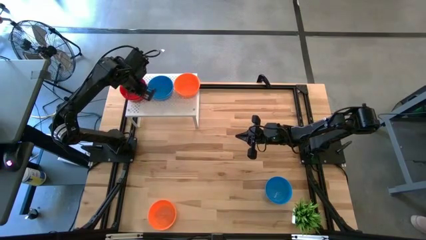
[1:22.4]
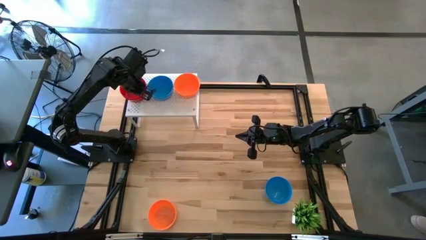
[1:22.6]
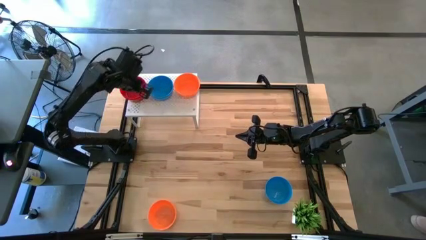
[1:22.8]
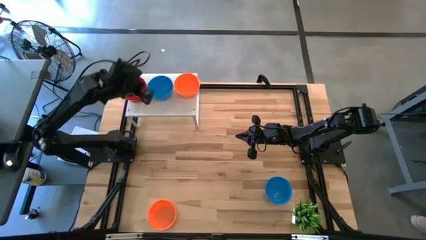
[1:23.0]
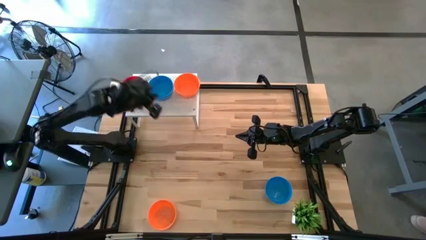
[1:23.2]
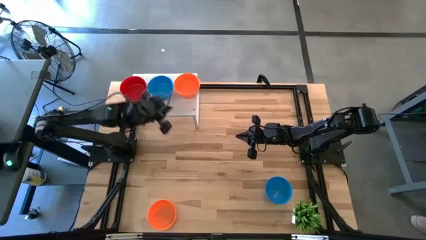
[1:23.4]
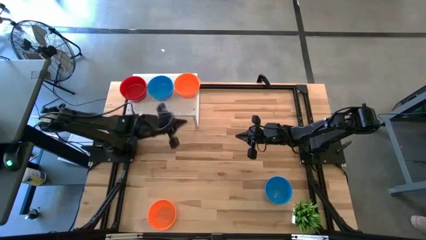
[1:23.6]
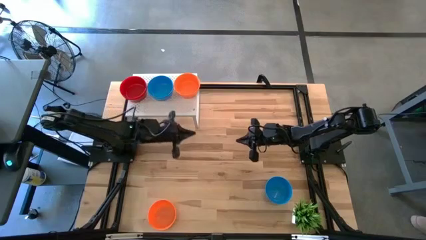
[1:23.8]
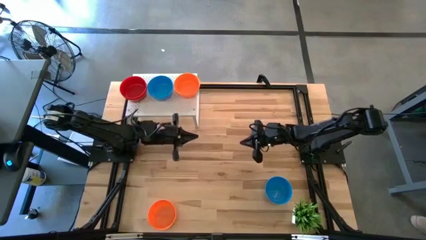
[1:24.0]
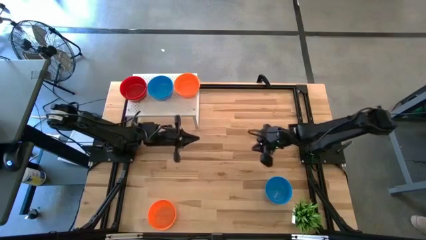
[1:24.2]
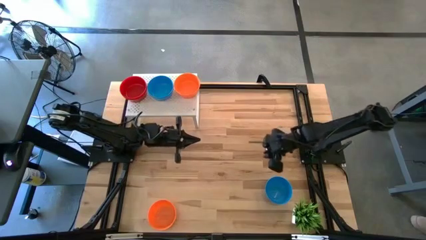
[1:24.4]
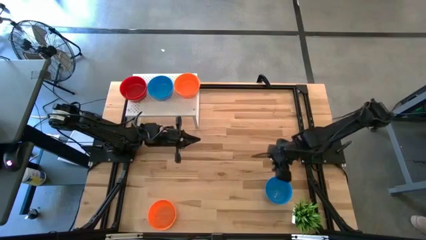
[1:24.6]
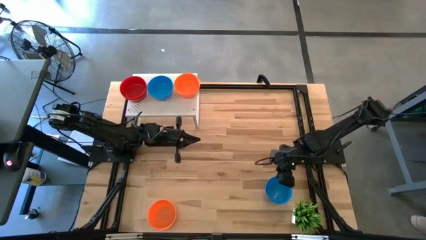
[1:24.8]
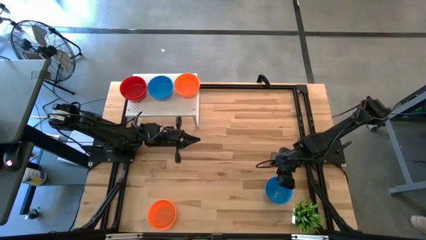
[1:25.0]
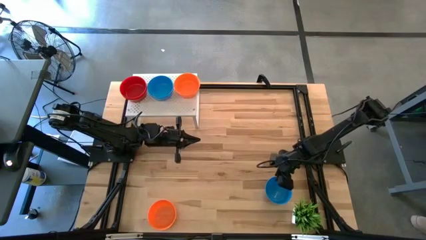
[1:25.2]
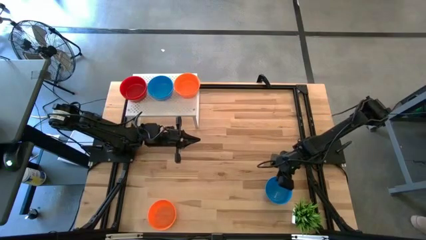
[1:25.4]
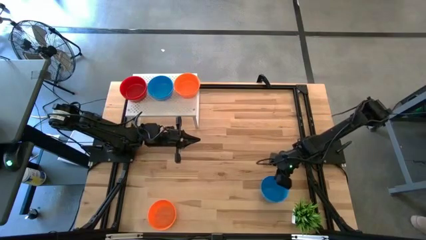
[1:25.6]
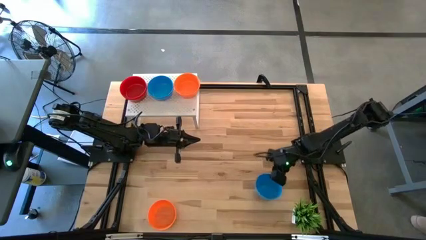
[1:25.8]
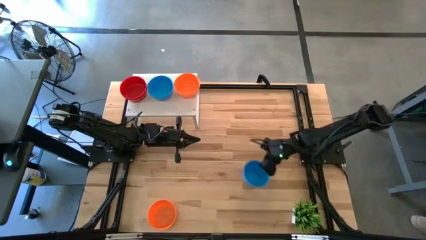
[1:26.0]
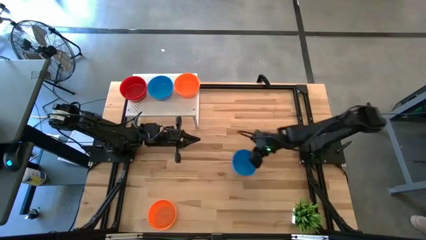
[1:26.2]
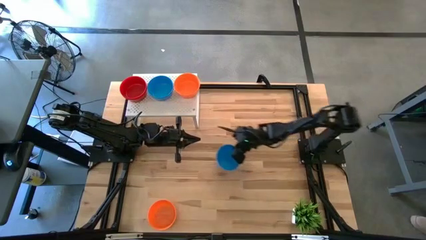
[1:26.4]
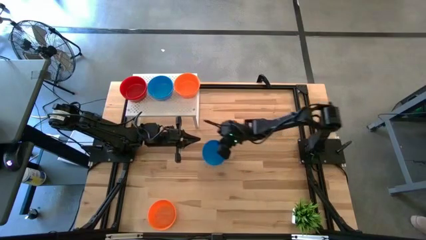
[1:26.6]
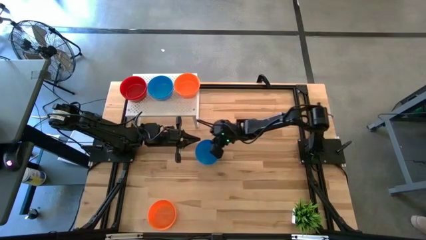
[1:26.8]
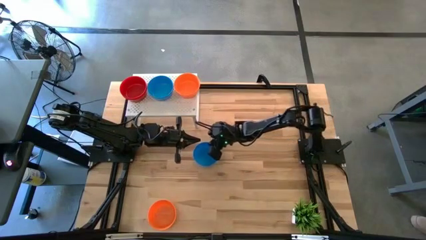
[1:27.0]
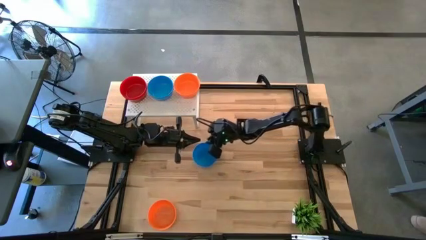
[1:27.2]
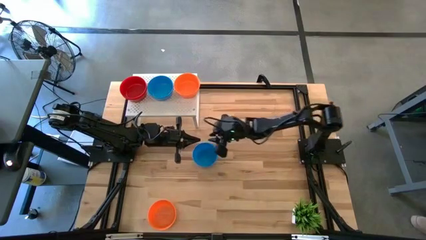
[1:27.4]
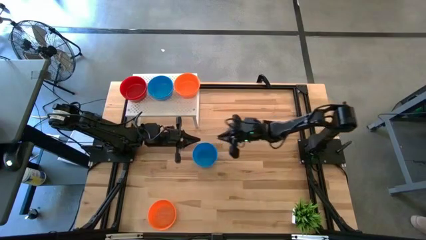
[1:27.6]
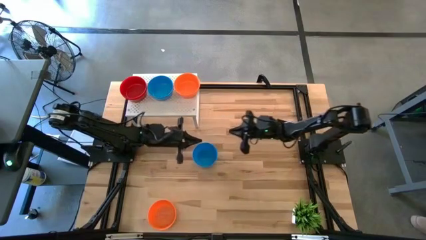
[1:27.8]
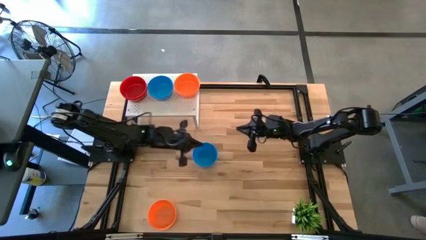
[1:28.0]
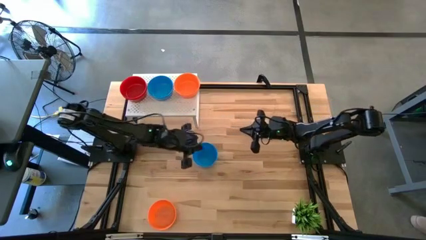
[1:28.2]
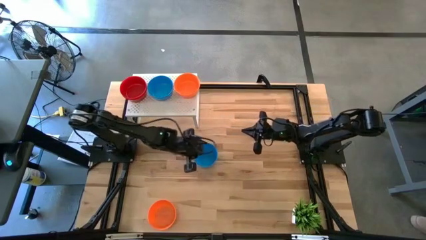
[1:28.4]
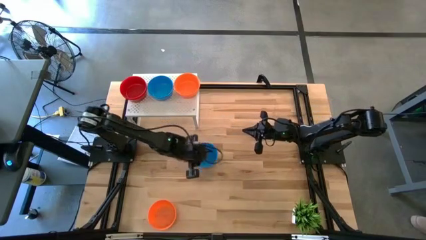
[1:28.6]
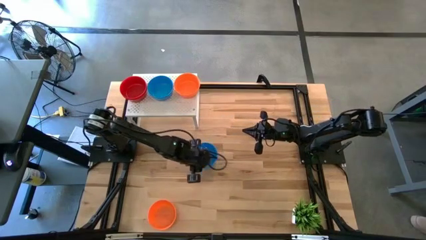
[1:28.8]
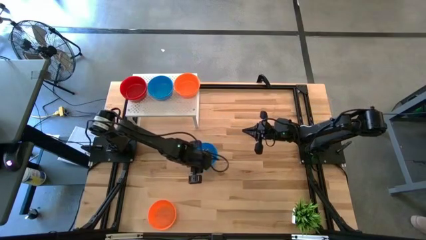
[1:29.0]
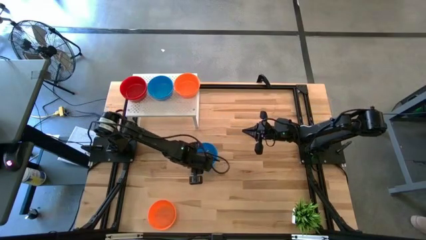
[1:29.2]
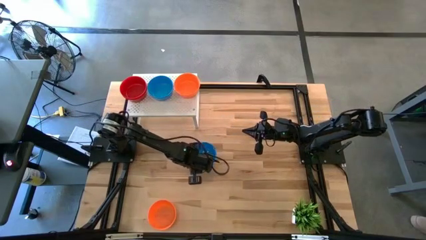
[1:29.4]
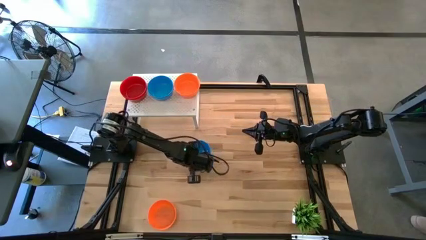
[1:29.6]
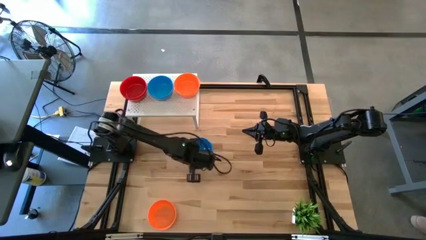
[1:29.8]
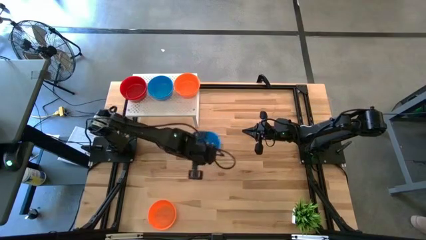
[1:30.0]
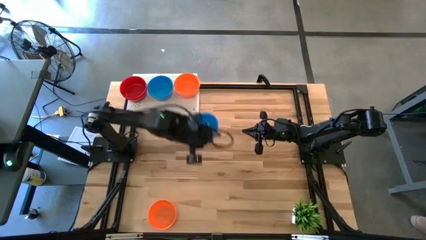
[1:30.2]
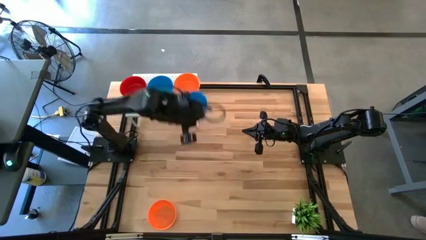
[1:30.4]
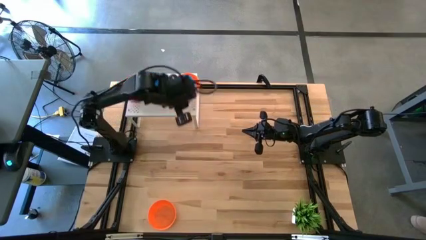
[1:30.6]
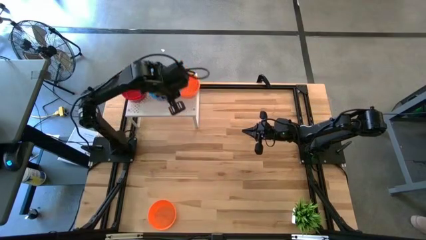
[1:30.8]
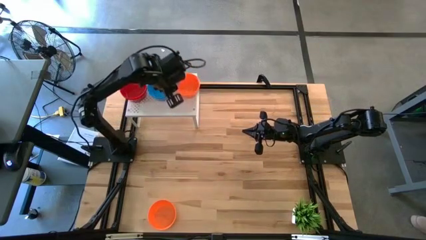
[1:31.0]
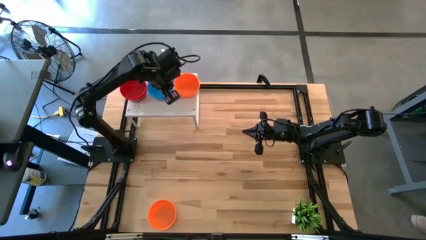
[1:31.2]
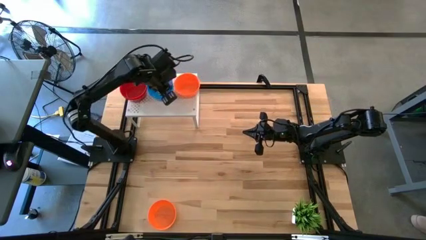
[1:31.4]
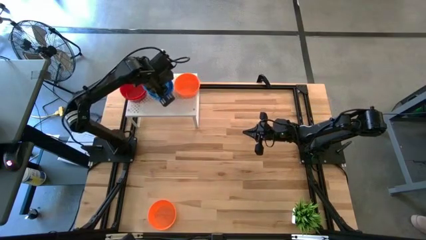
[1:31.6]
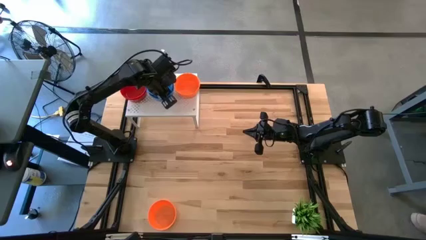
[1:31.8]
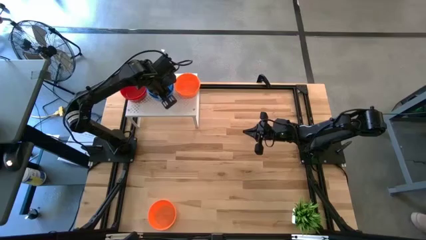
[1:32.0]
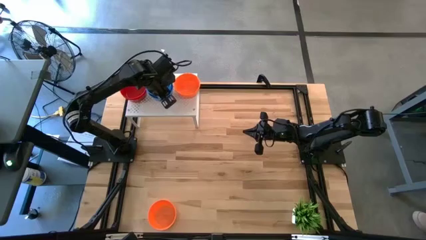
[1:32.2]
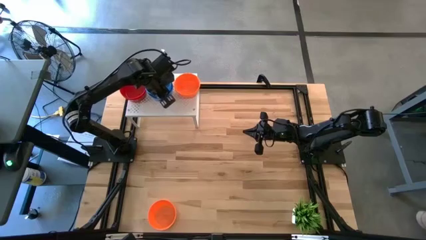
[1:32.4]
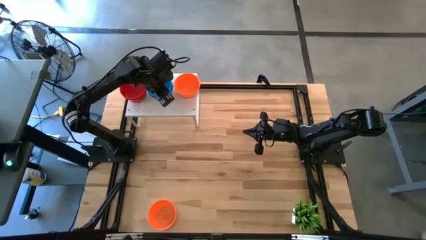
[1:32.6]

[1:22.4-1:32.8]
Task: Pick & Place Mini bowls
Stack the blue bowl on the blue bowls on the shelf
